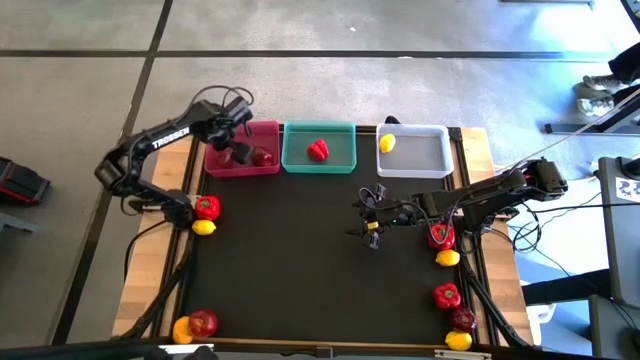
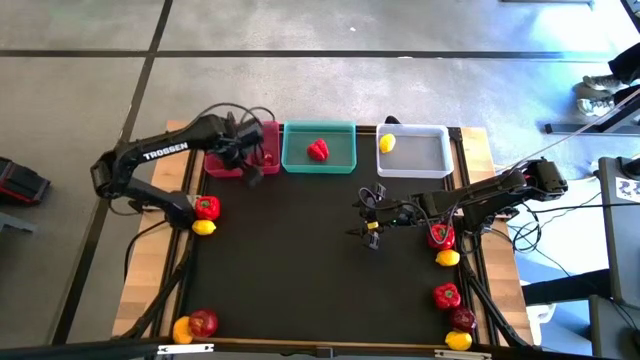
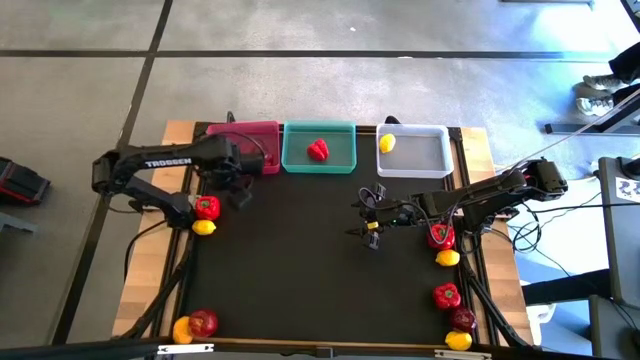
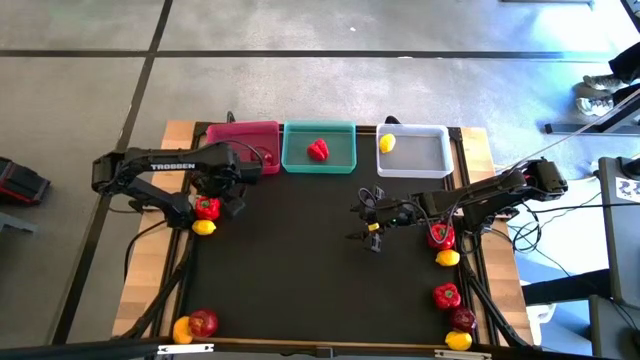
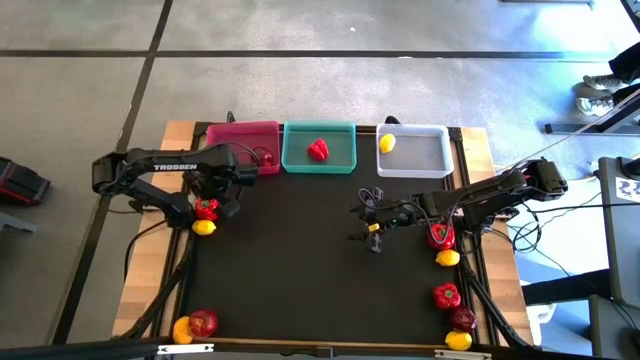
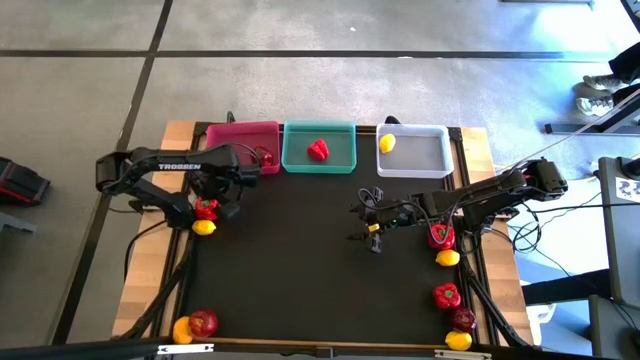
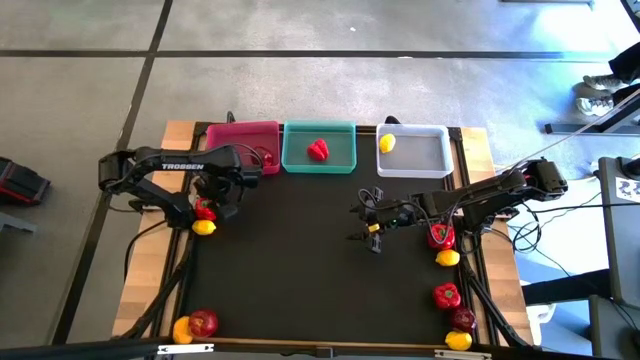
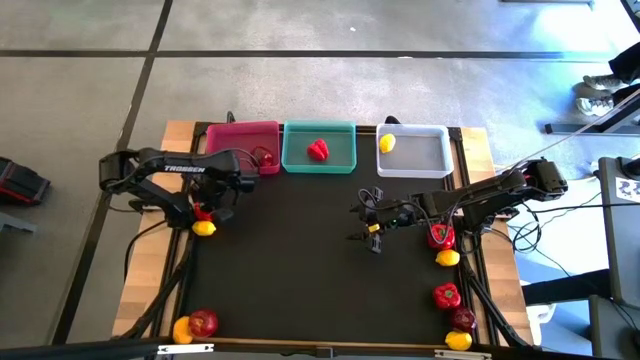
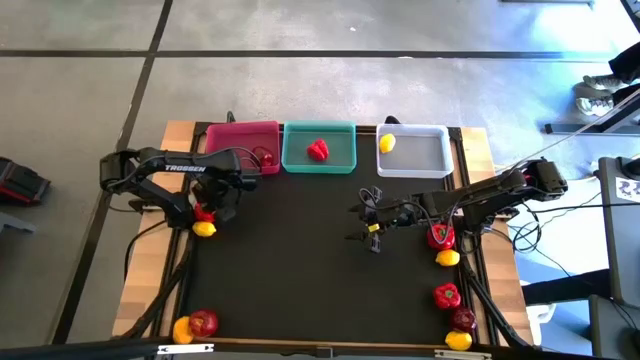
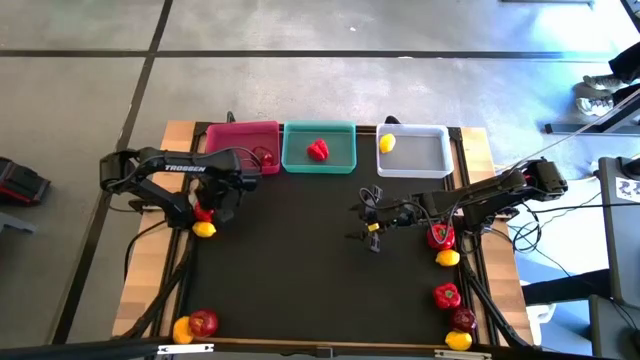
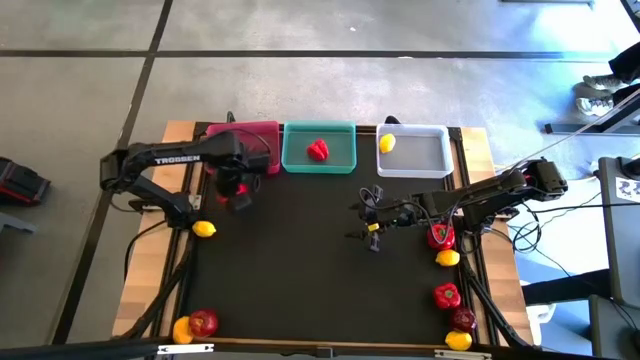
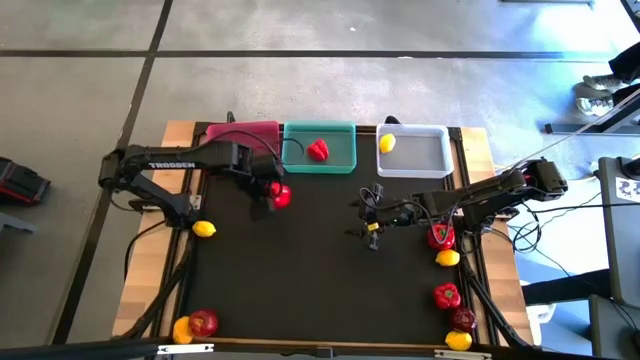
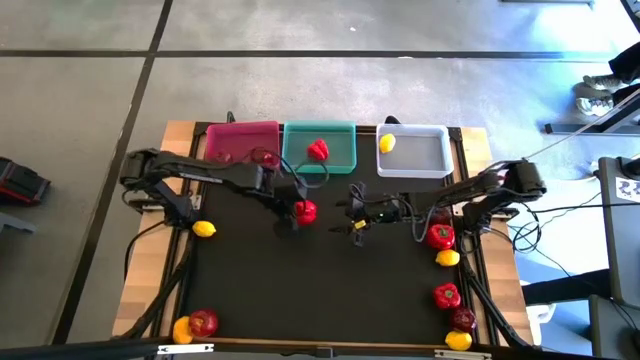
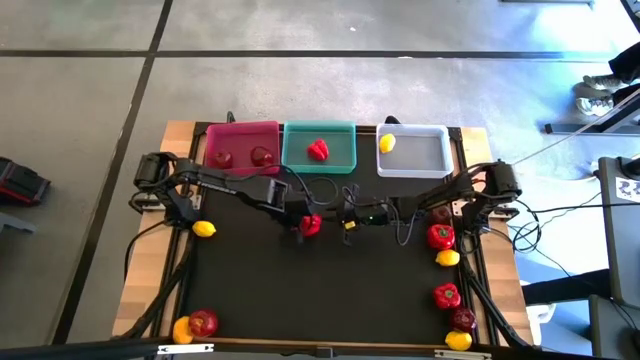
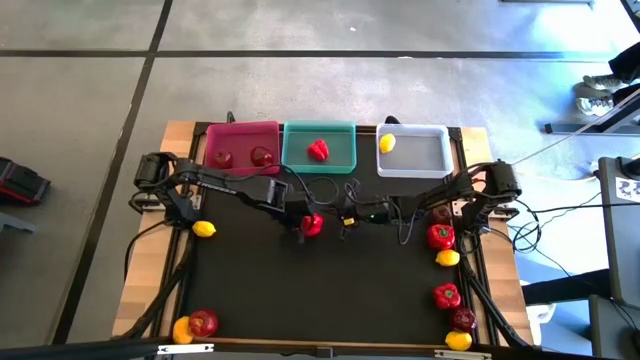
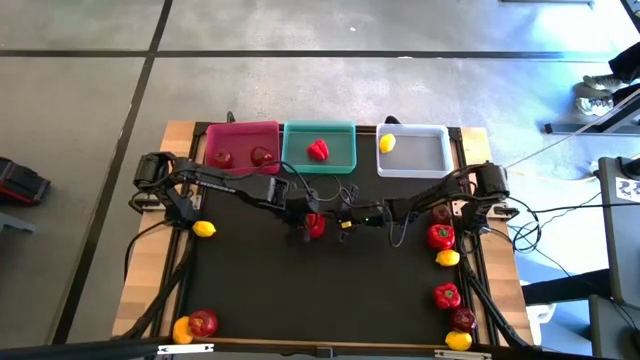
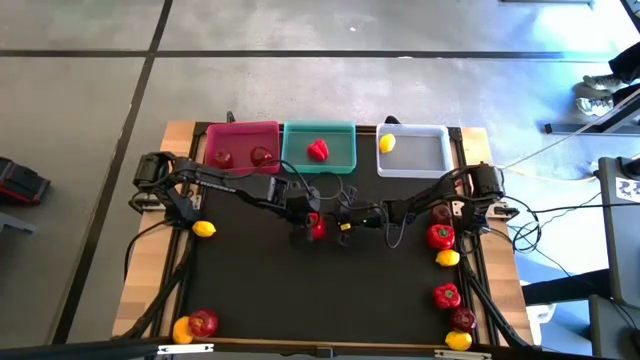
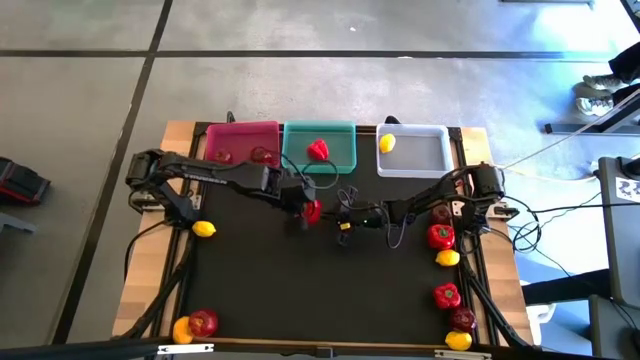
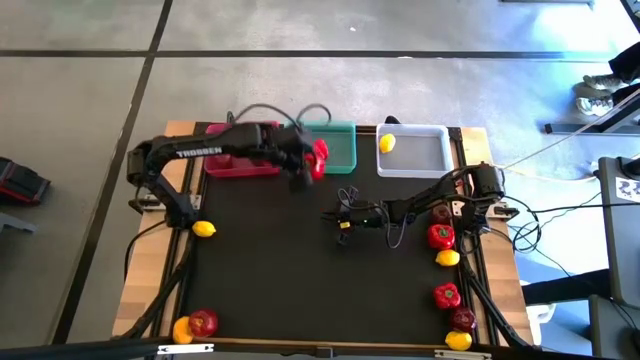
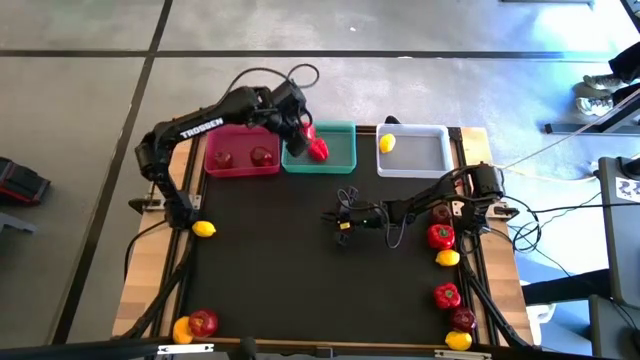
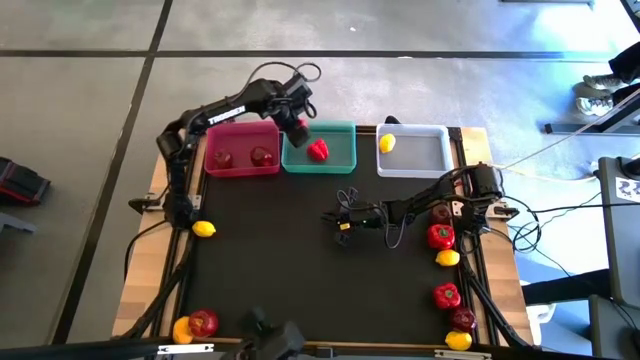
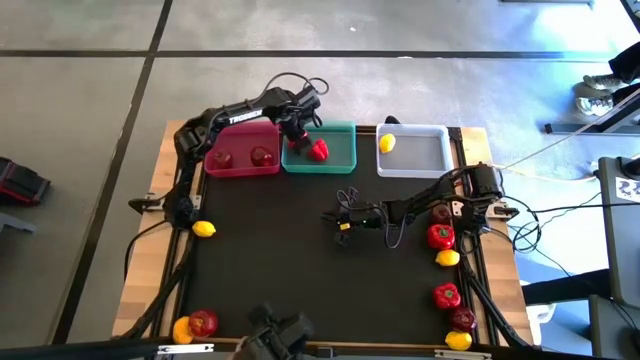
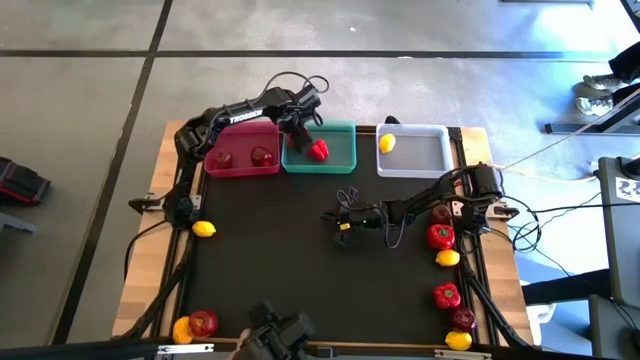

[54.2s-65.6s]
Task: Sort produce into baskets
Put the red bell pepper into the green bin

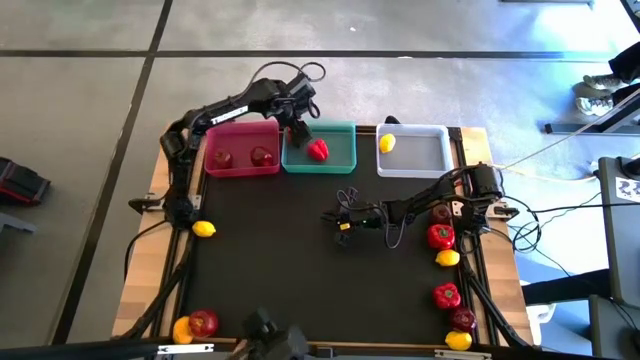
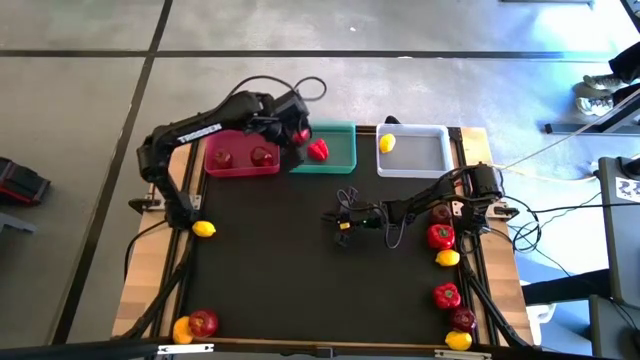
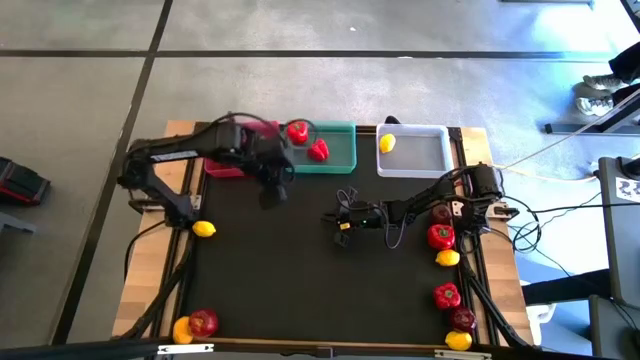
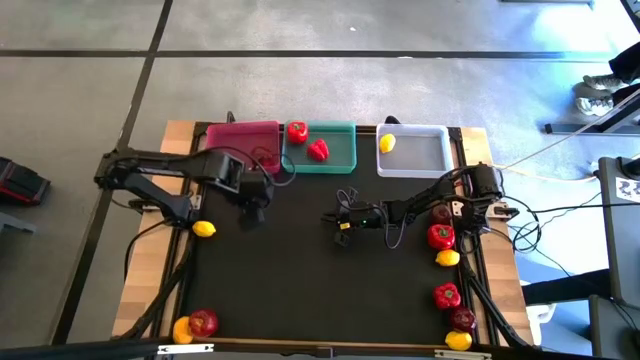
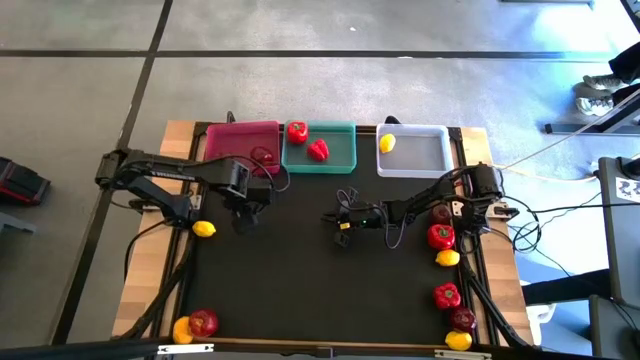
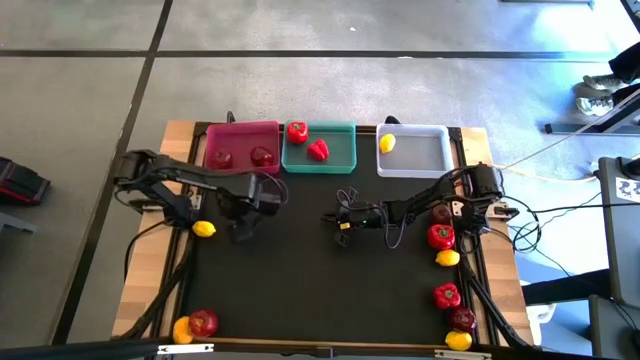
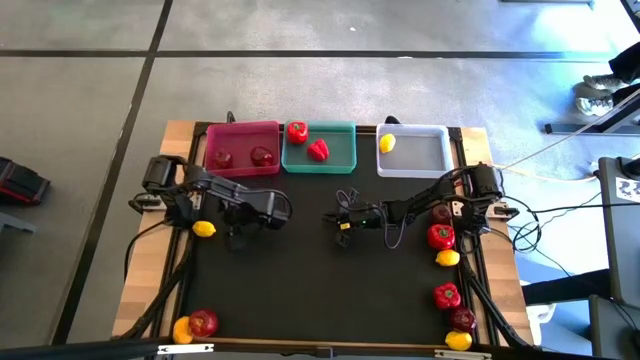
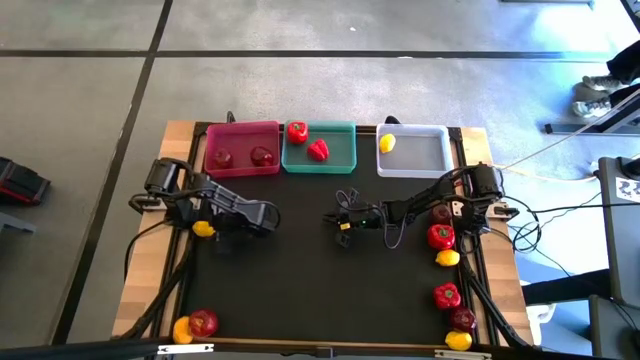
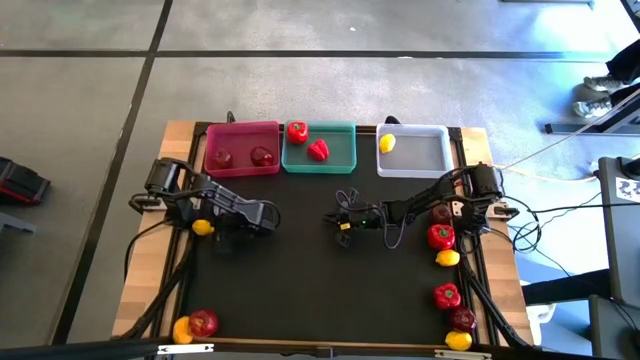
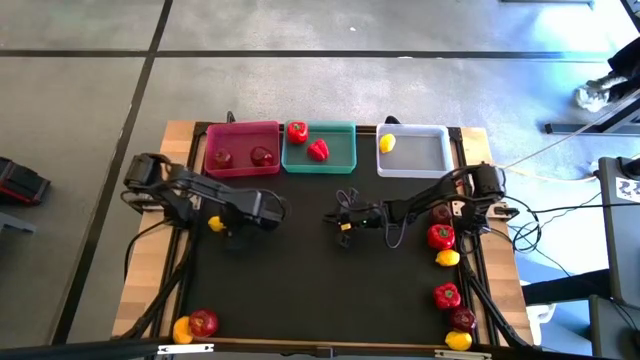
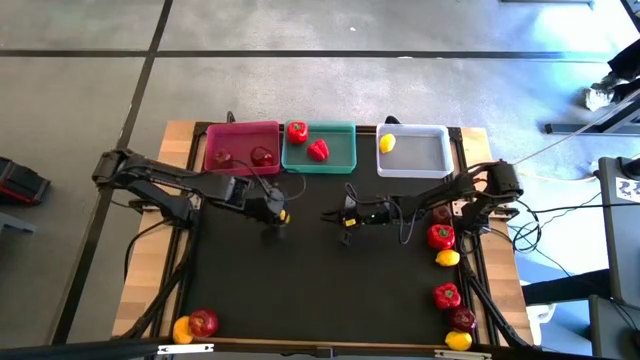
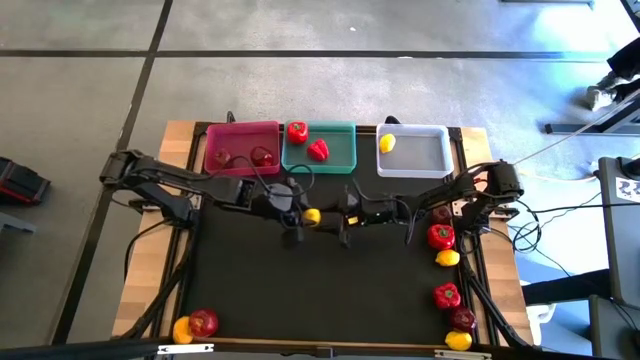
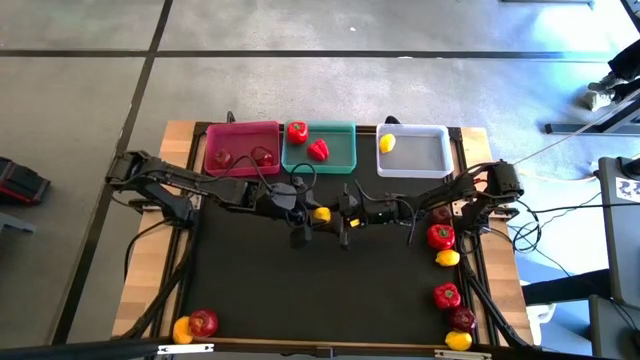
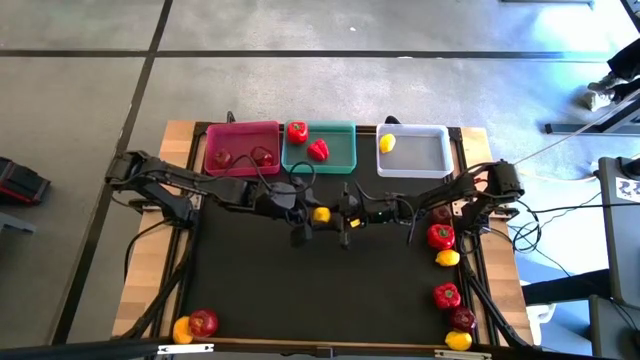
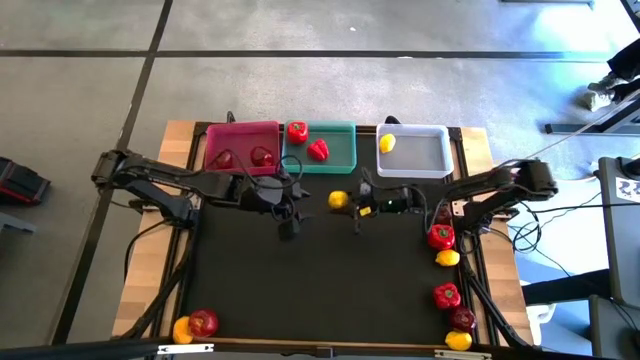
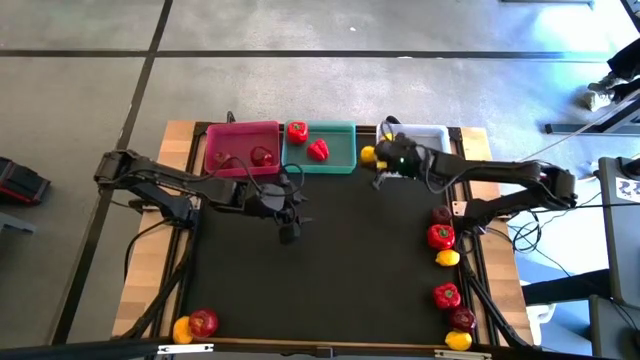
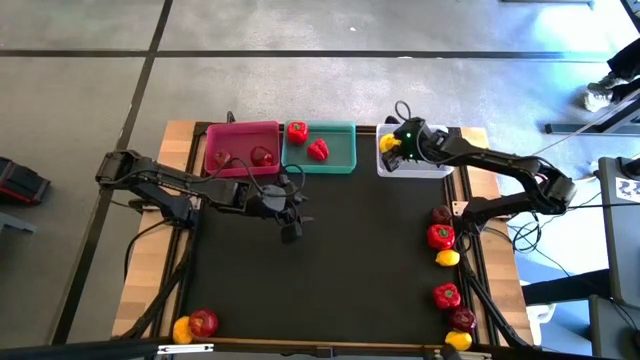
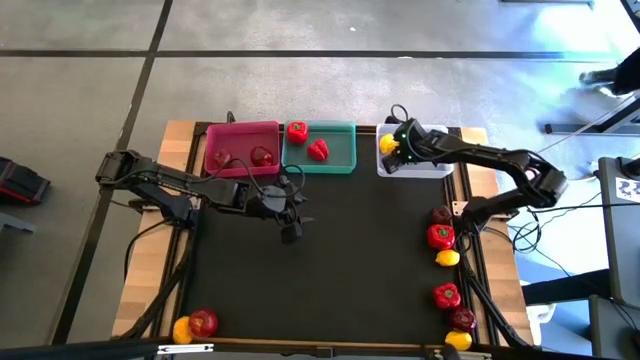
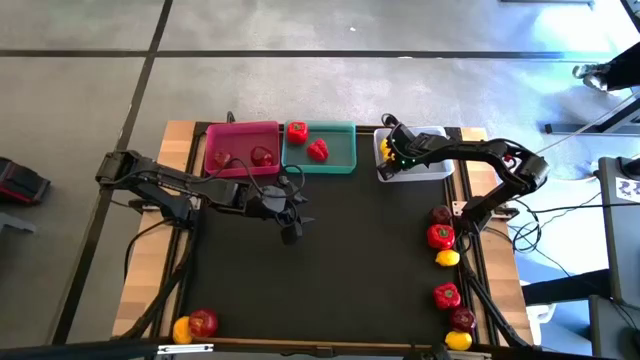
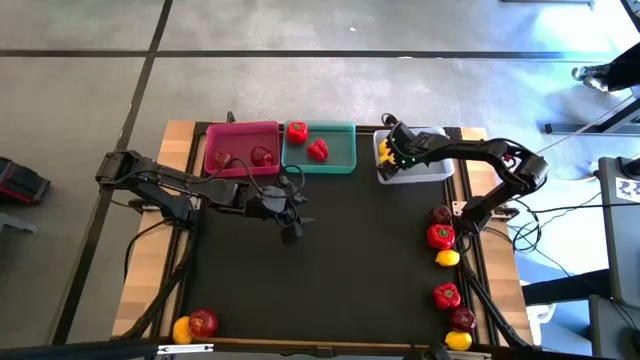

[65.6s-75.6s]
Put the lemon into the white bin
